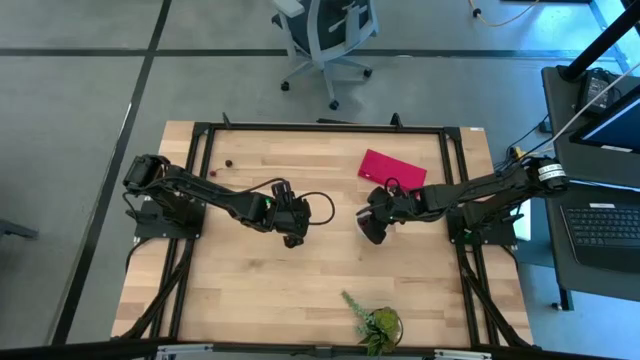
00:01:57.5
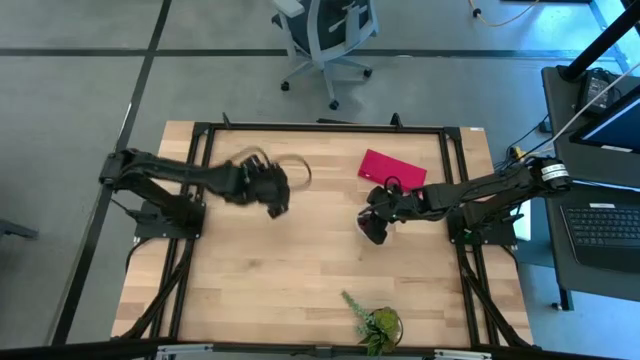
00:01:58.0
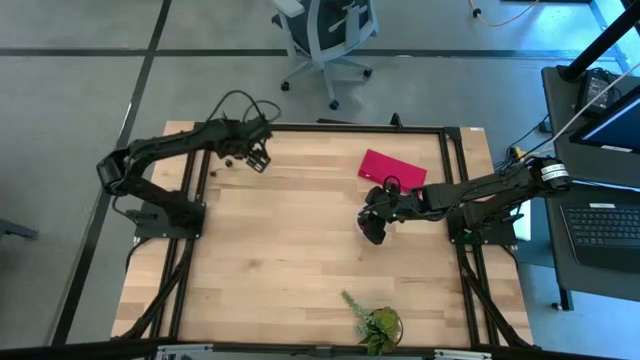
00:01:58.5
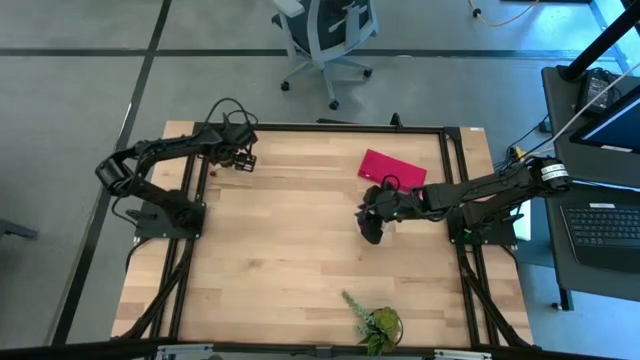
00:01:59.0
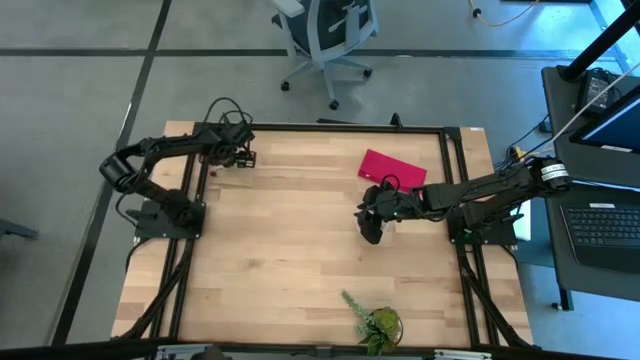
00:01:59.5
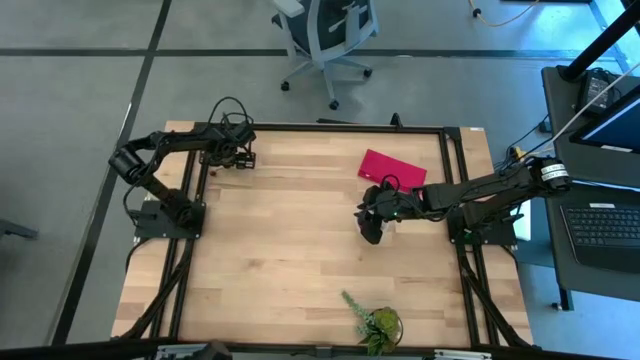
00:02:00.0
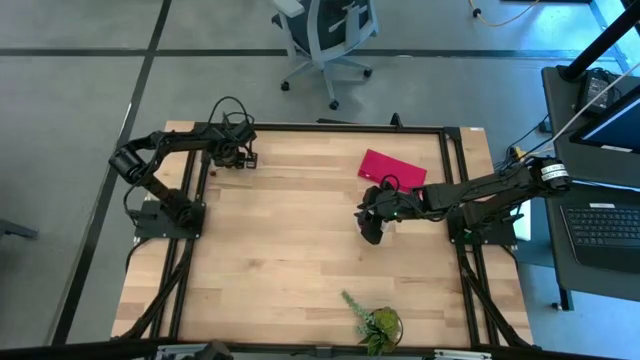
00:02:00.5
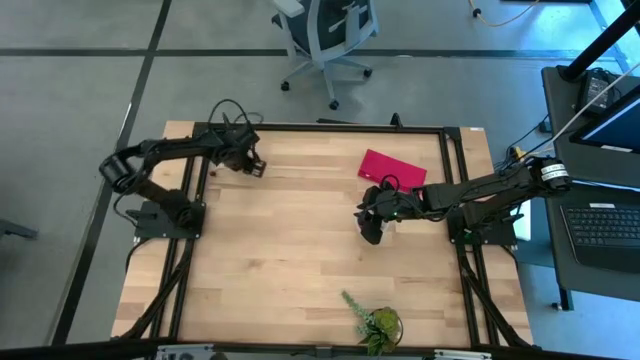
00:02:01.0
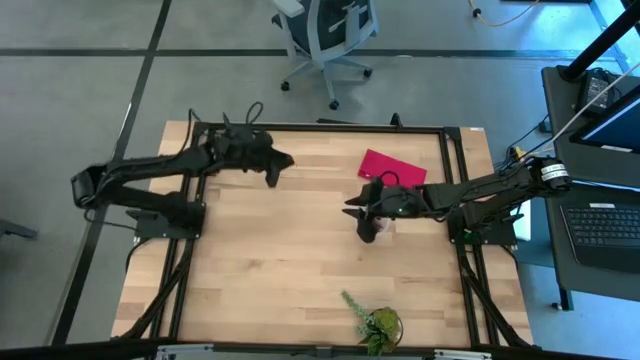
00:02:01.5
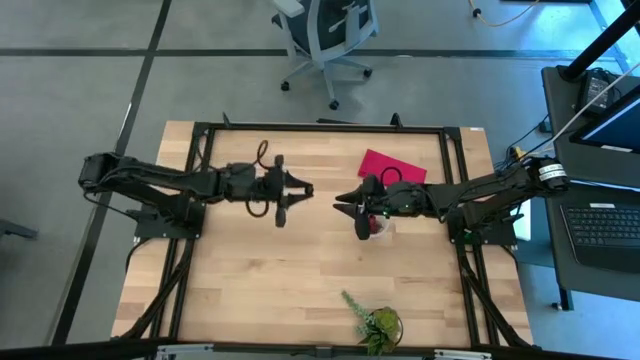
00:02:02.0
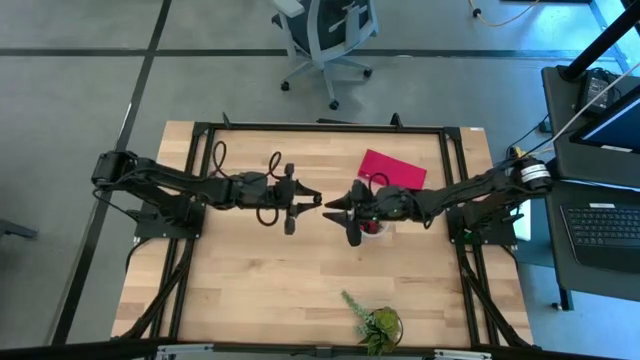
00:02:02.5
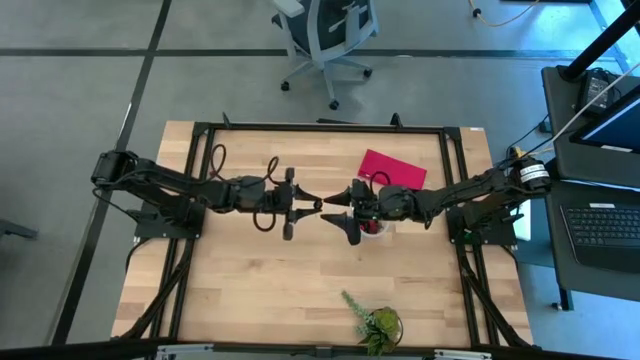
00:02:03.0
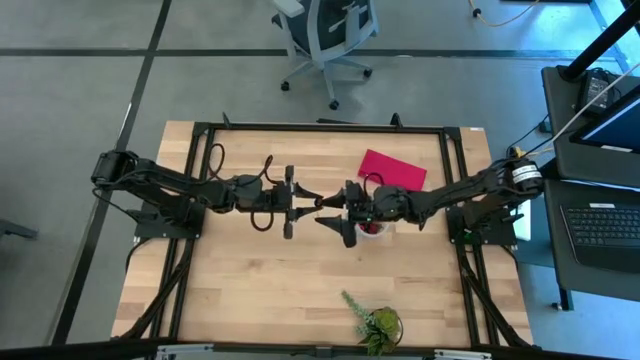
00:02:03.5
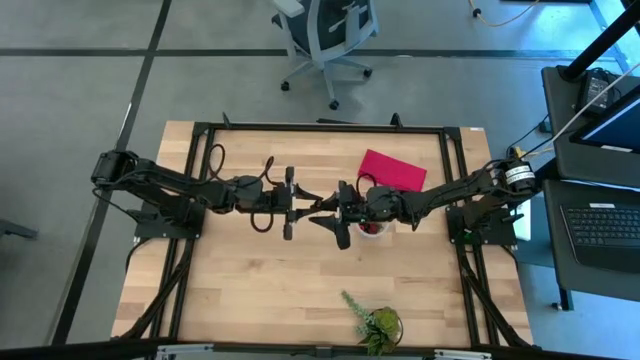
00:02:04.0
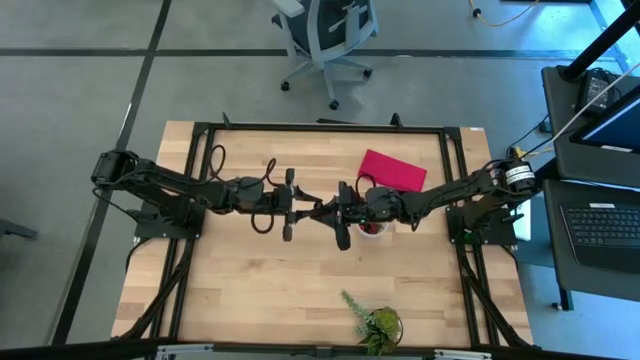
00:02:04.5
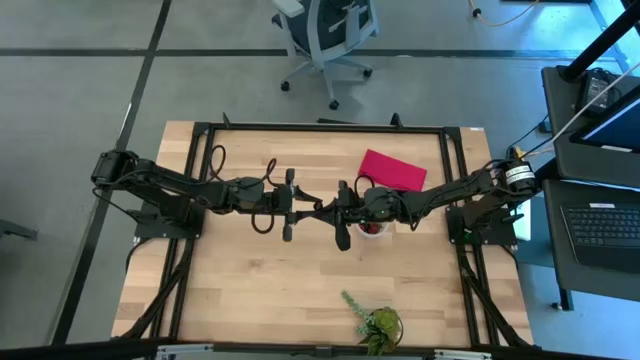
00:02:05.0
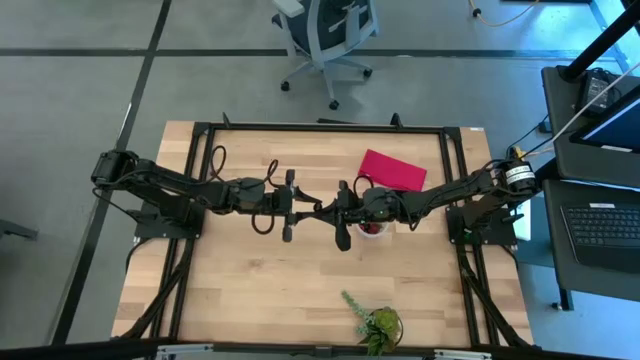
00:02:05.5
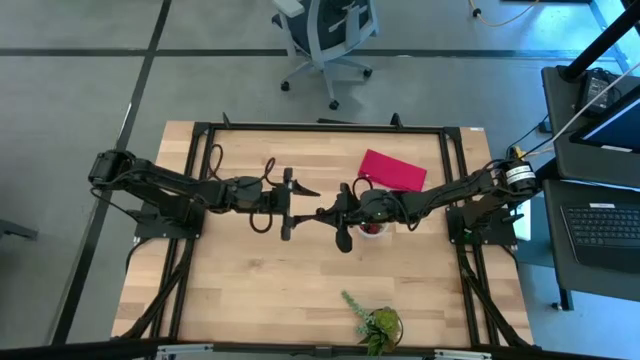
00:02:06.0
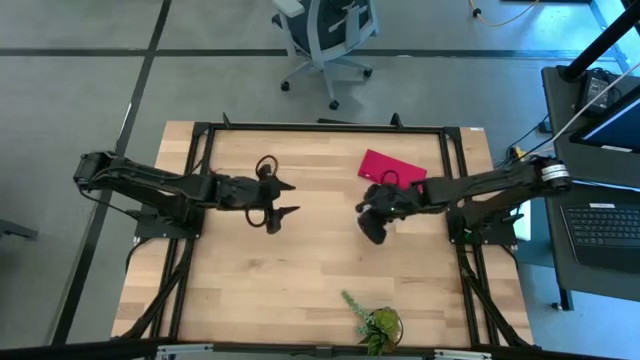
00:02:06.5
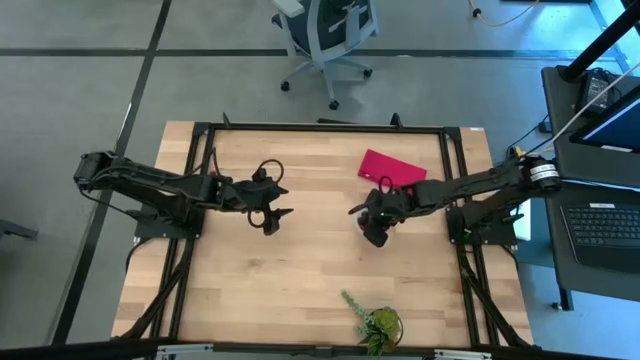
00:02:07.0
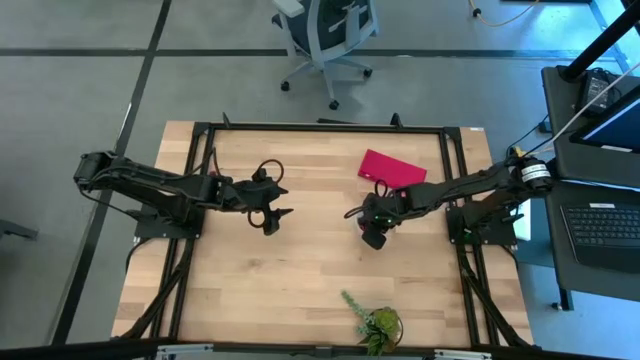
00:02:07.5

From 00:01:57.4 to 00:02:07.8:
Task: Pick and placing Produce into tupperware
Put the black cherry into the transparent container

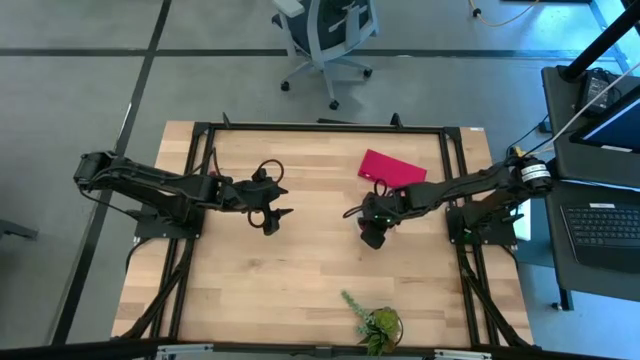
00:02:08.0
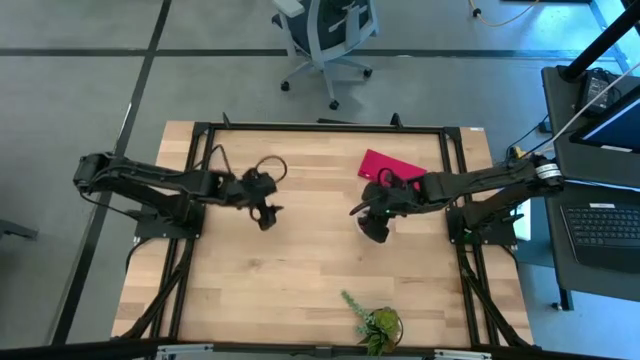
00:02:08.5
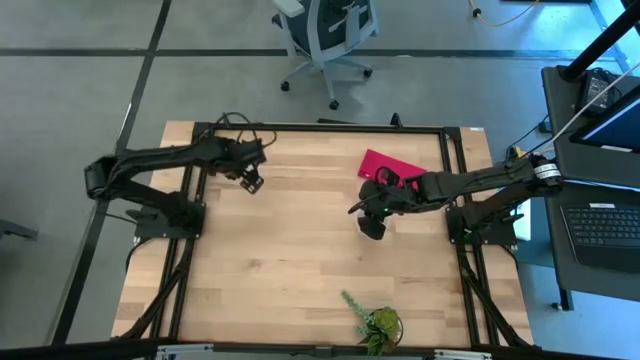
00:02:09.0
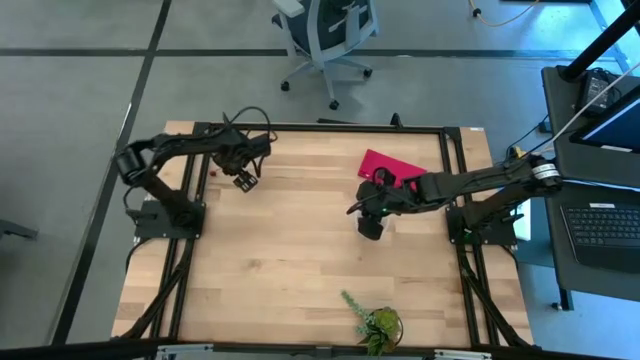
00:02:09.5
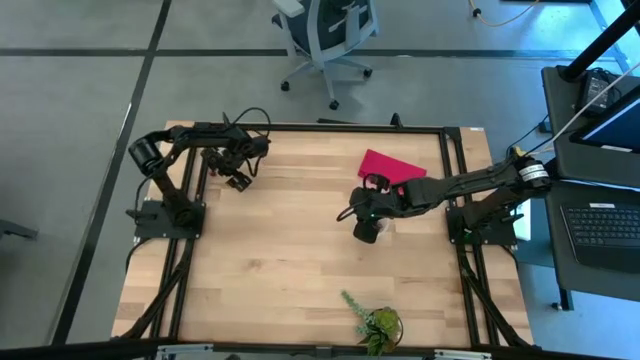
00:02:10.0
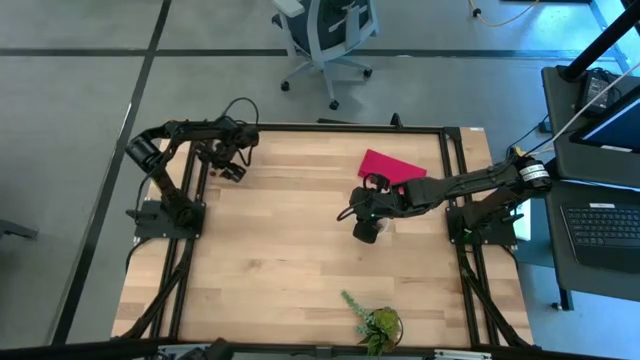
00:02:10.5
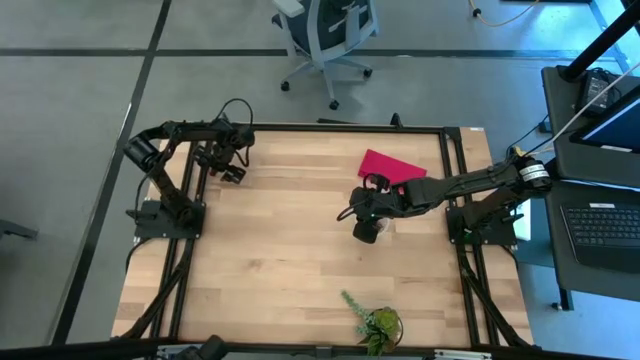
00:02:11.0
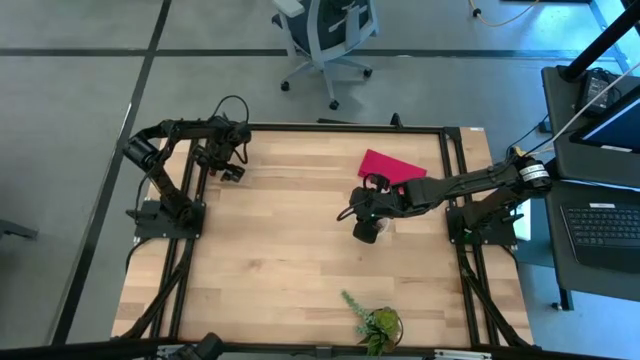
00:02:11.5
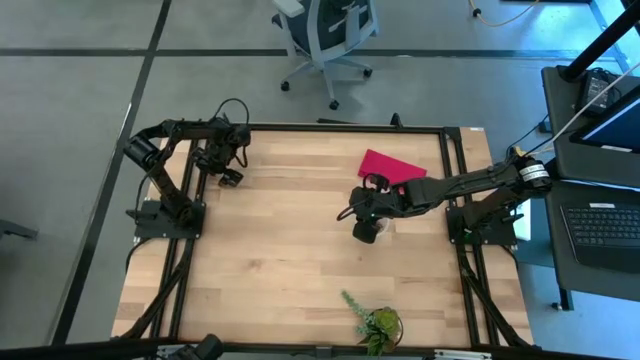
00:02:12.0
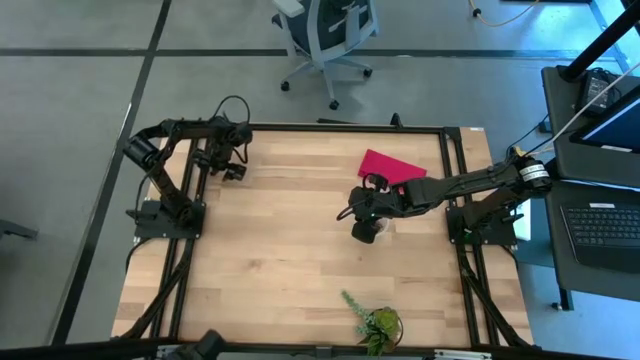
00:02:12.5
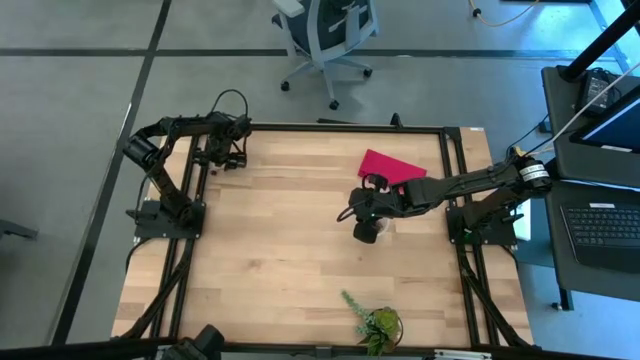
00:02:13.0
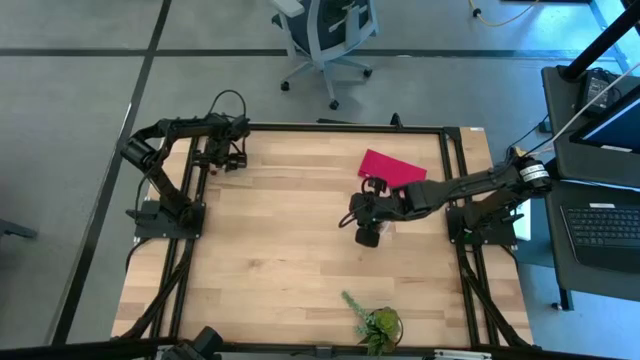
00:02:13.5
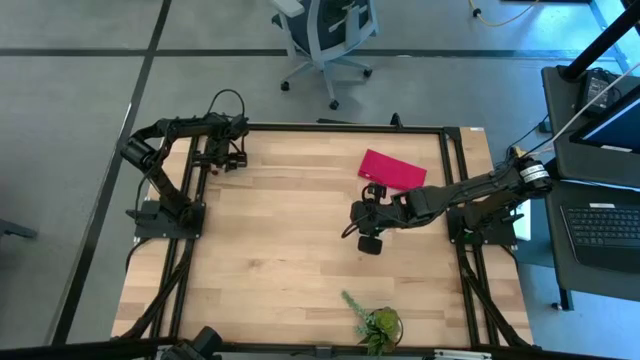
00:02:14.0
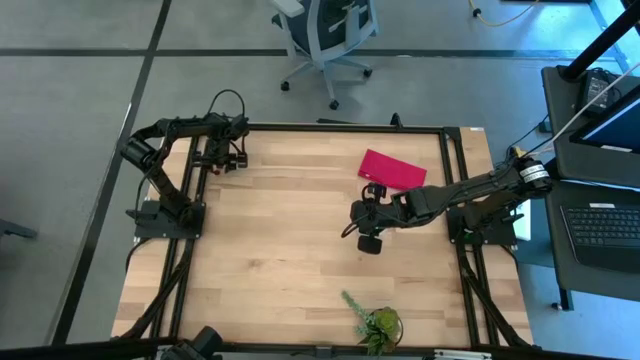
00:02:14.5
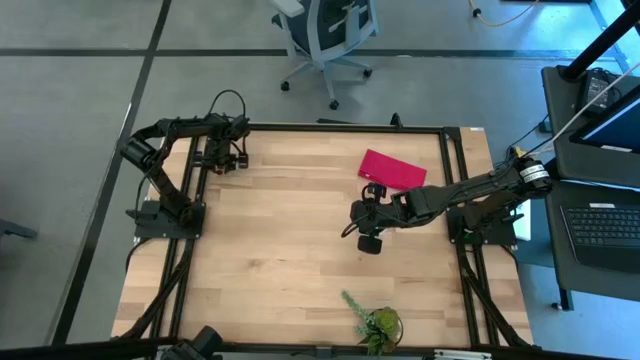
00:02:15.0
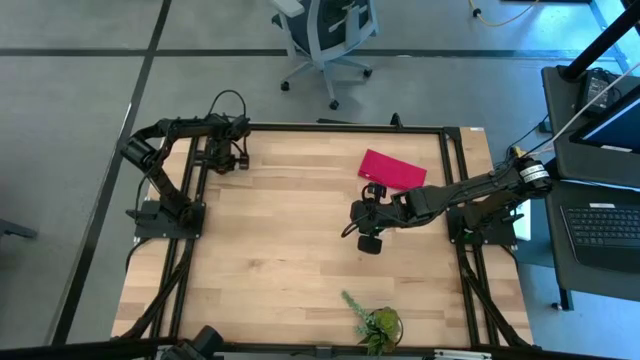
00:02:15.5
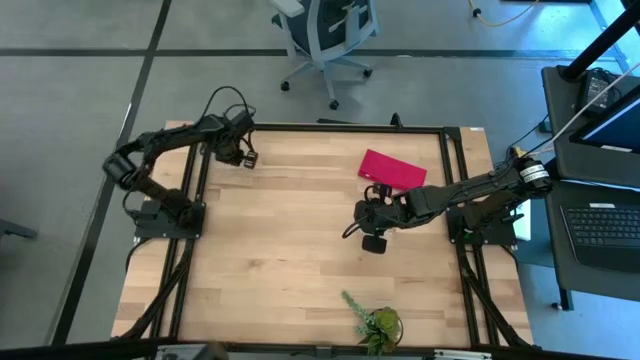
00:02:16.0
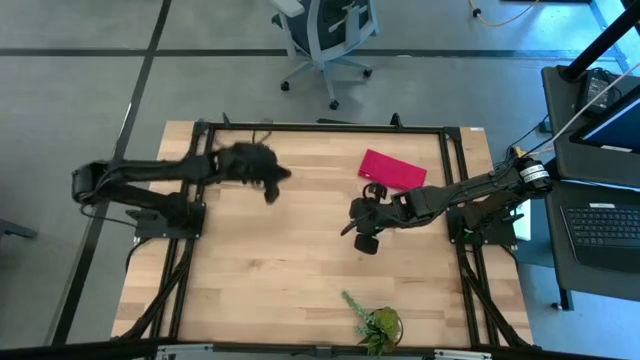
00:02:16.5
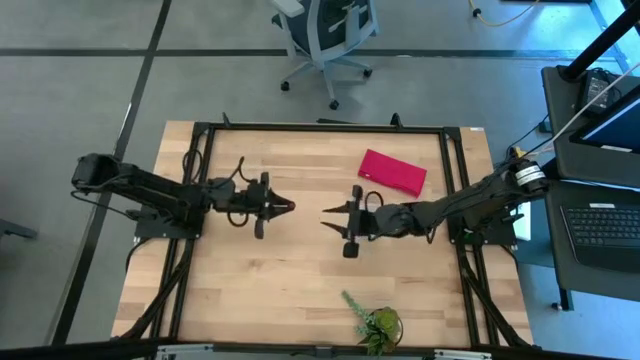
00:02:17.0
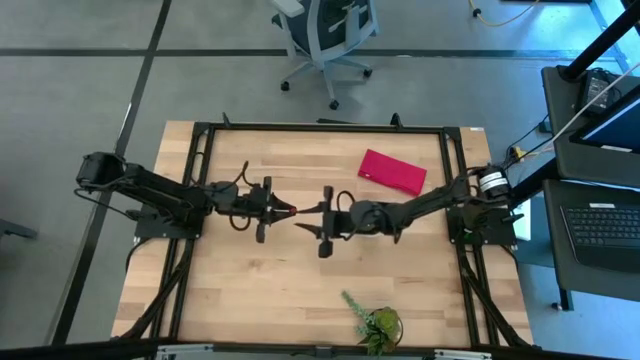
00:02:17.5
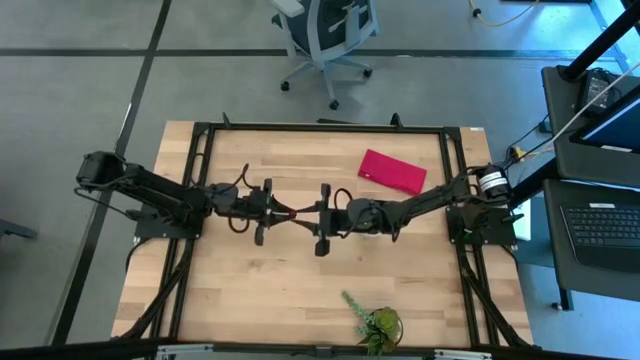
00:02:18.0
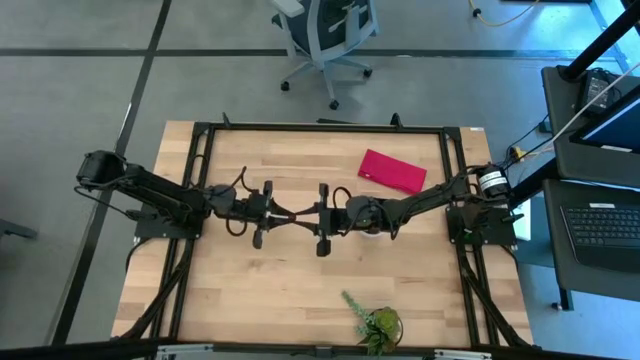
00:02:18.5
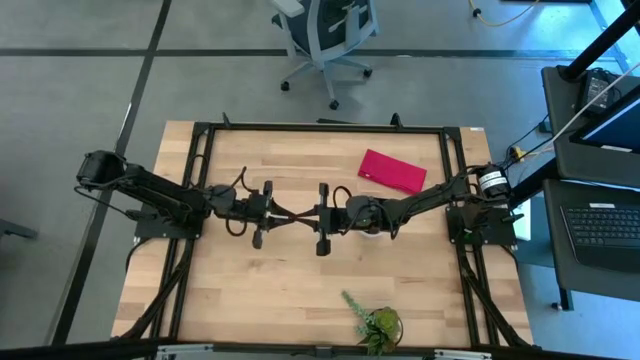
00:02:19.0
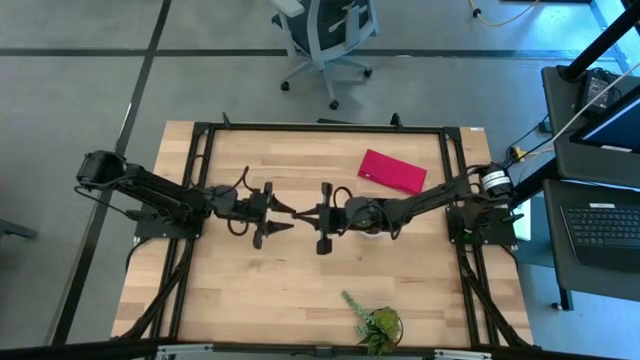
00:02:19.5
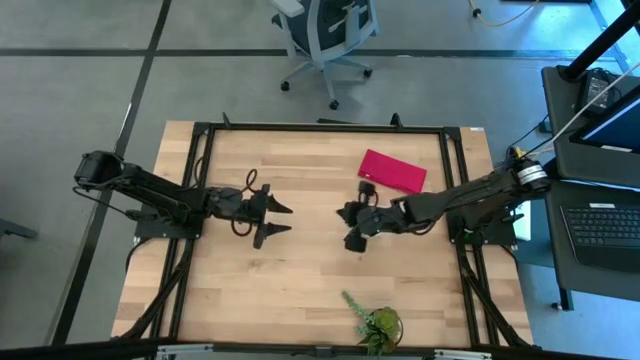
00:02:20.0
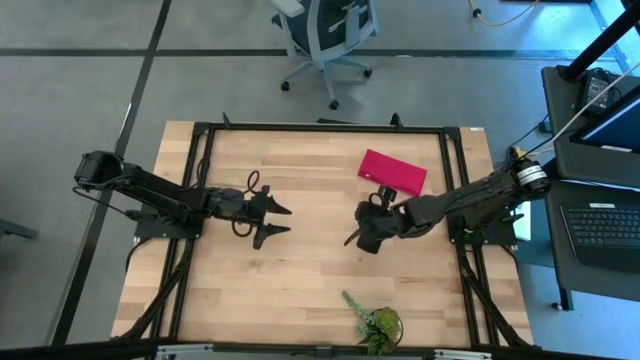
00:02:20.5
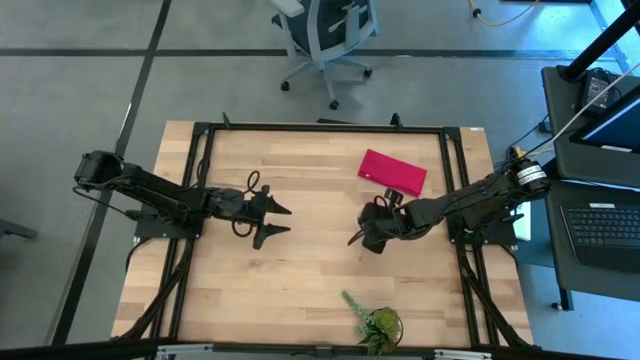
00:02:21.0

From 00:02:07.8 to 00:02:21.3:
Put the red cherry into the transparent container
